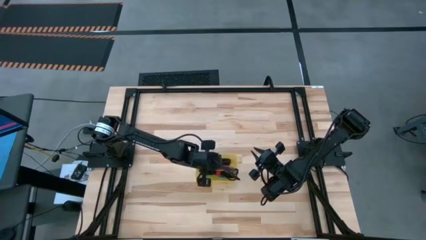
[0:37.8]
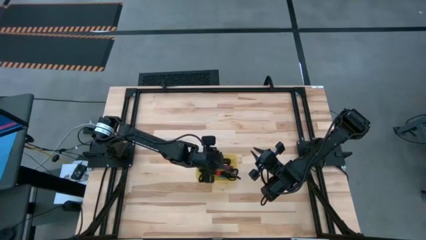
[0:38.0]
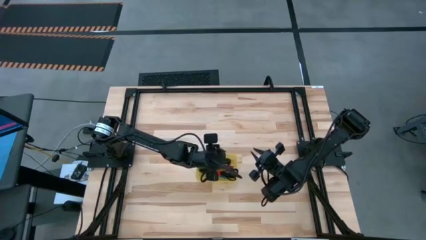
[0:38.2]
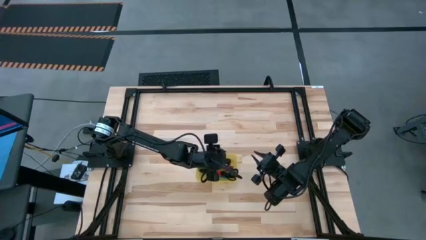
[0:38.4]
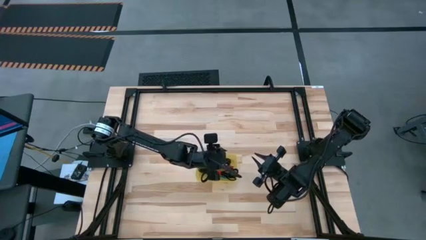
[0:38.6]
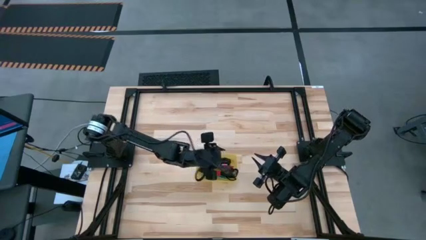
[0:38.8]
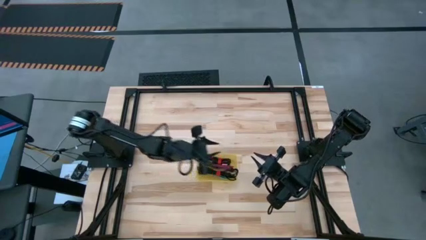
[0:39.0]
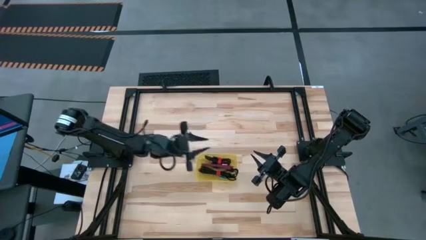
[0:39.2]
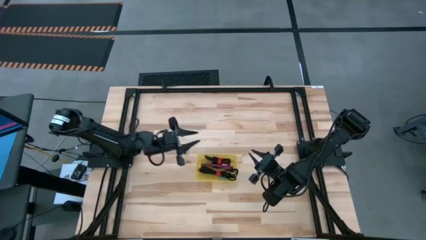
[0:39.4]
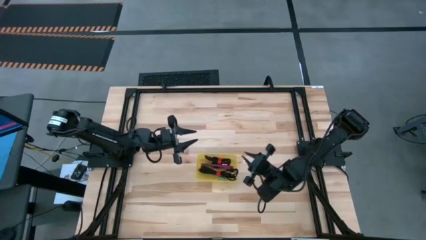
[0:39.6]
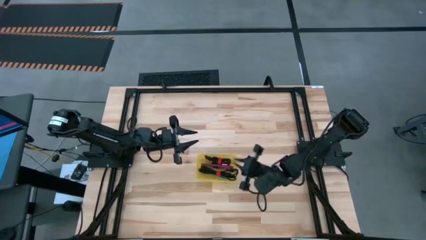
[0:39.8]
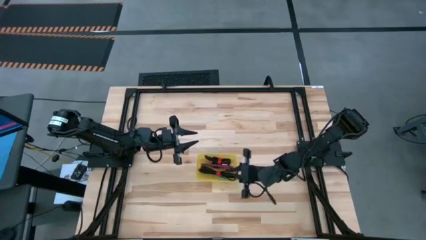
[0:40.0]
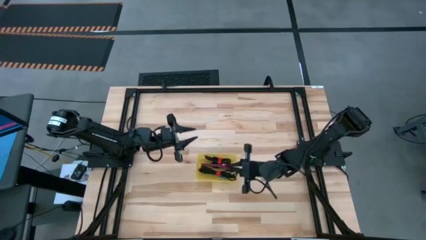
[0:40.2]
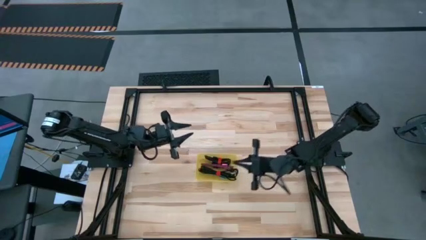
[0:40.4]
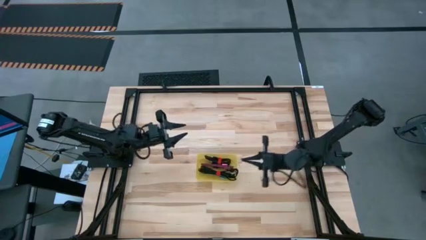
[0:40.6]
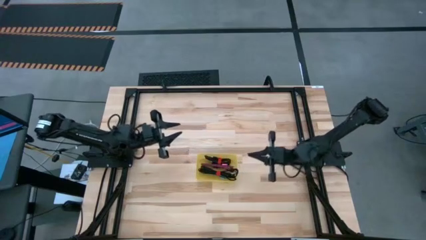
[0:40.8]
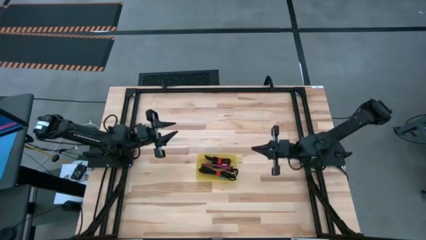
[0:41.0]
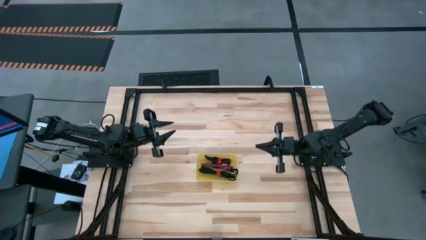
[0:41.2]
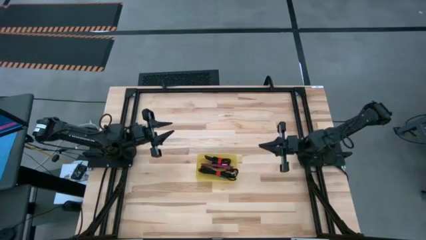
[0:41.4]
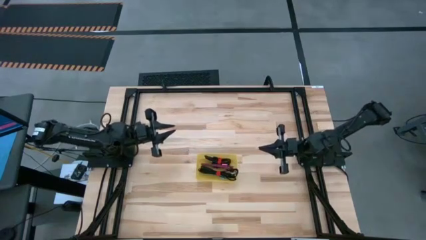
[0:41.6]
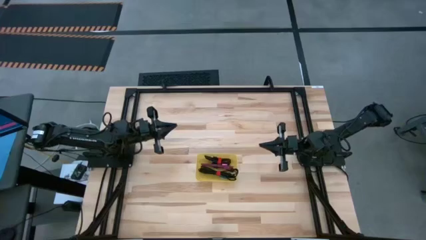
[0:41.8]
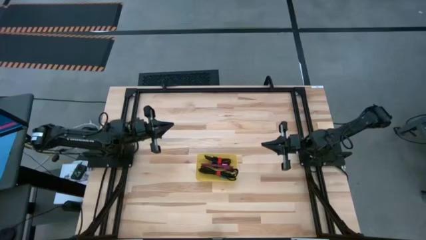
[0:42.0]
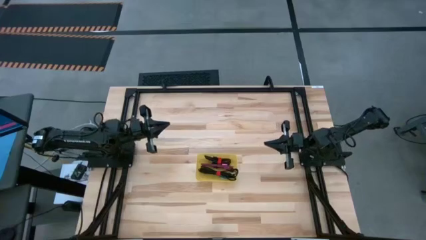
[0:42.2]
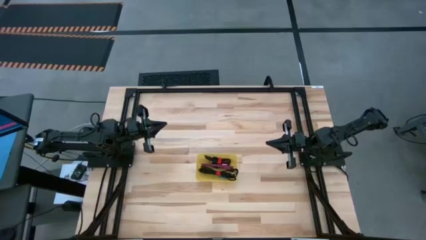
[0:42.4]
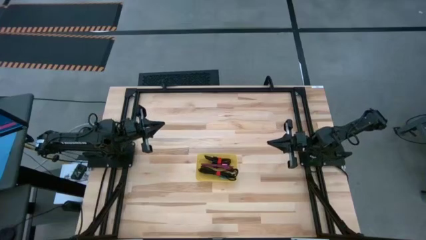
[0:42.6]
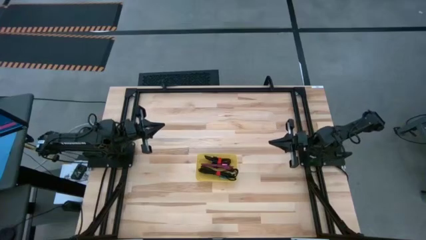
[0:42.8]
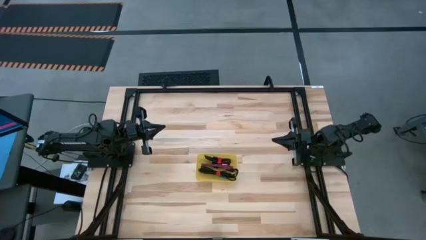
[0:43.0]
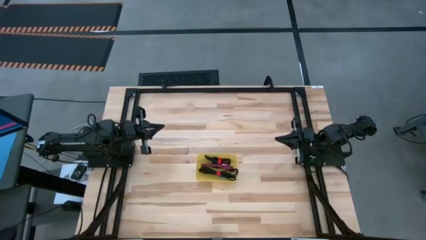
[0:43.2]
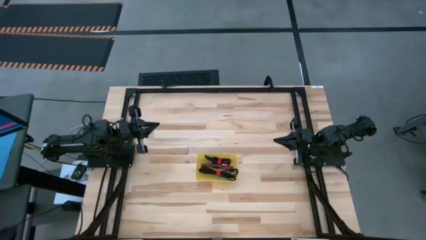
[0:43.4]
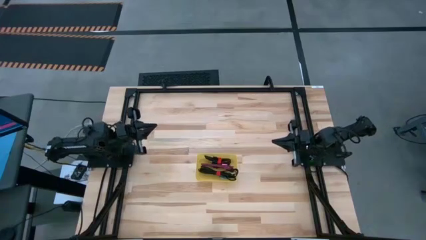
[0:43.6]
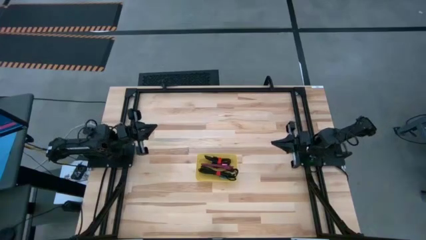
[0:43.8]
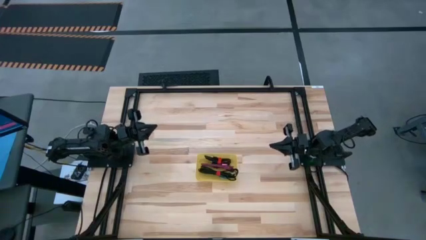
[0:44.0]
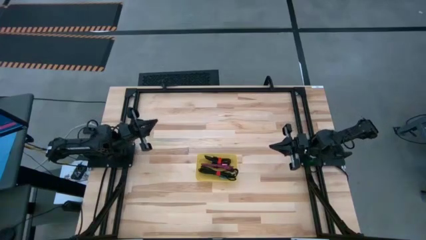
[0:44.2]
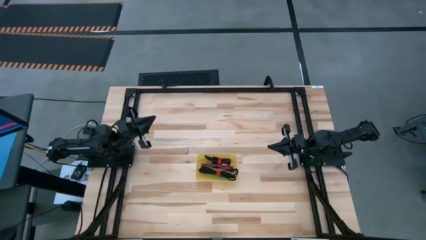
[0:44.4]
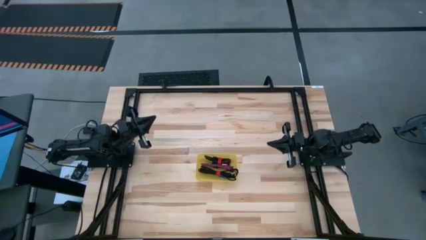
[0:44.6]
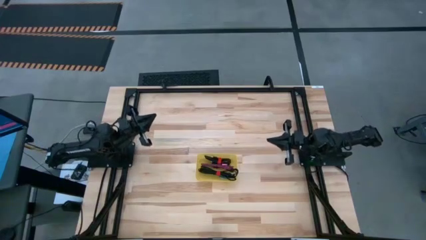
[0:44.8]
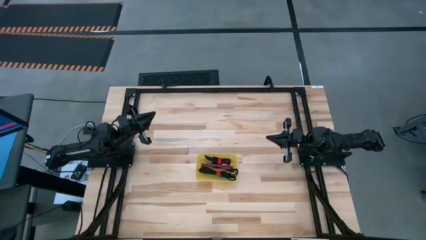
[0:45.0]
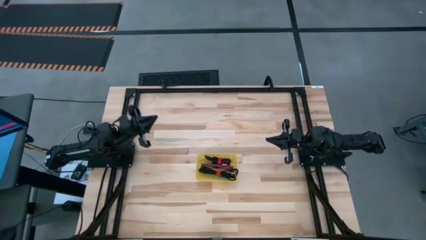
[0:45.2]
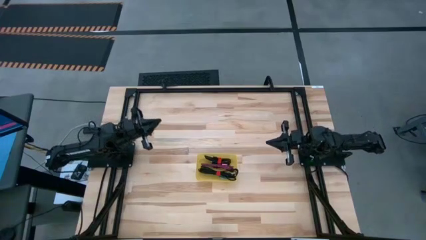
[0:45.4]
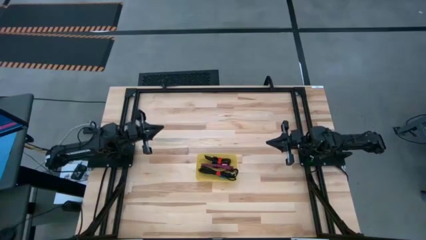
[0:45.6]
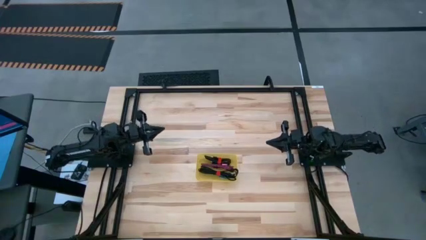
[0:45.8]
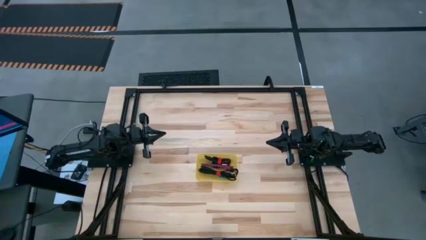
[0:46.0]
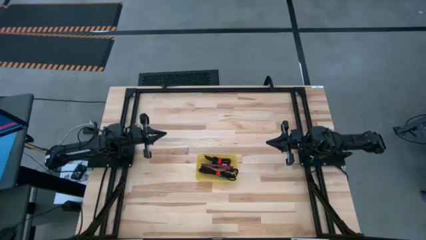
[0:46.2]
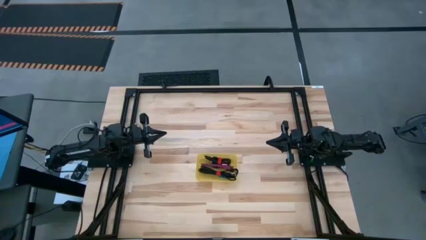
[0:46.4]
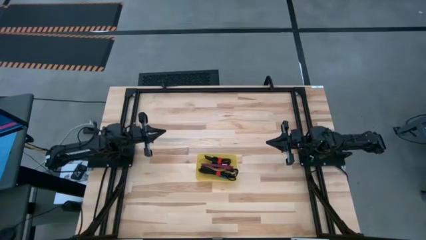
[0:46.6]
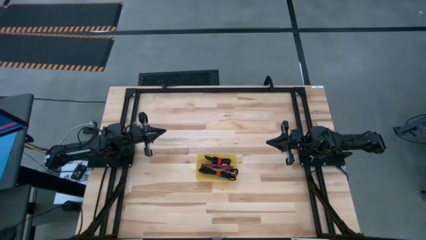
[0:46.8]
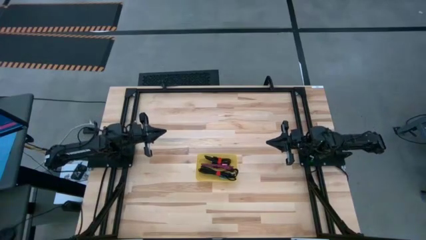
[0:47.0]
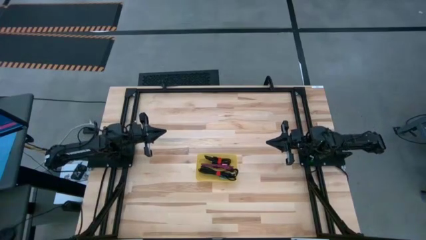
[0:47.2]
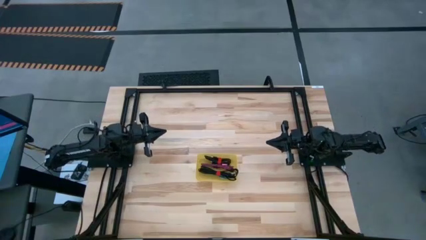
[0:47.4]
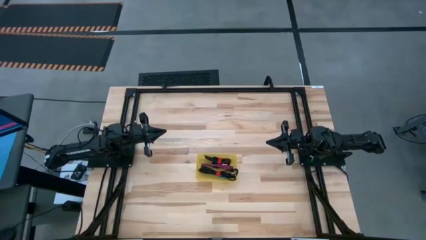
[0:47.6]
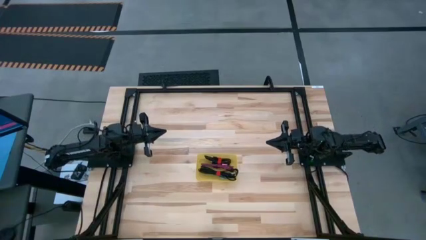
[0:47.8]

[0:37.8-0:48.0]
Task: Pick and place USB-C Cables
Return to Home Position

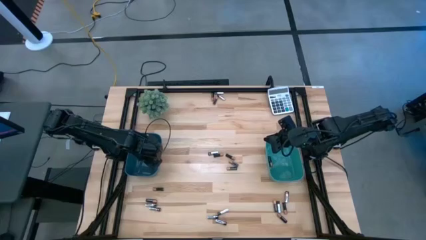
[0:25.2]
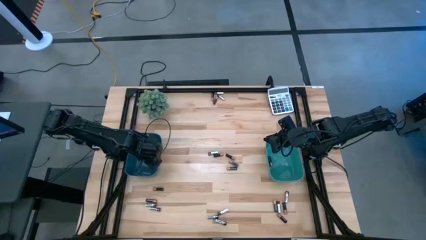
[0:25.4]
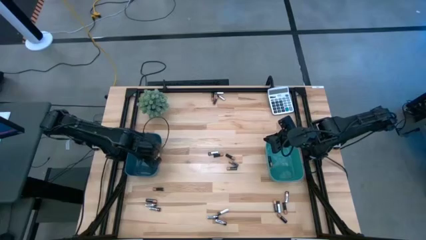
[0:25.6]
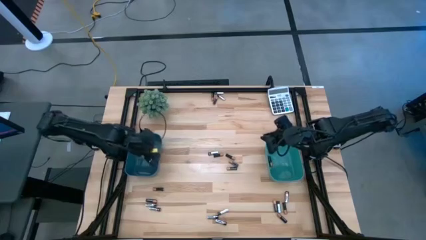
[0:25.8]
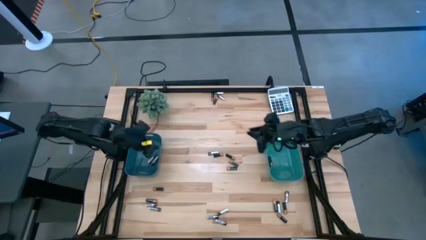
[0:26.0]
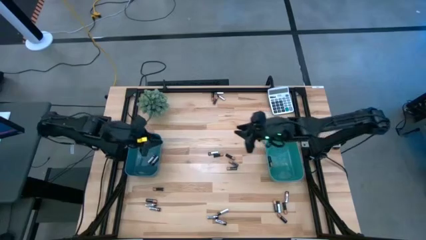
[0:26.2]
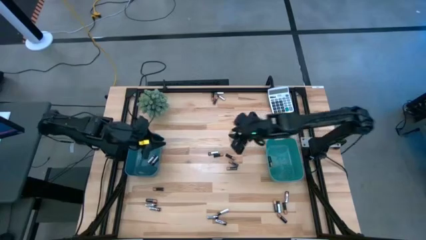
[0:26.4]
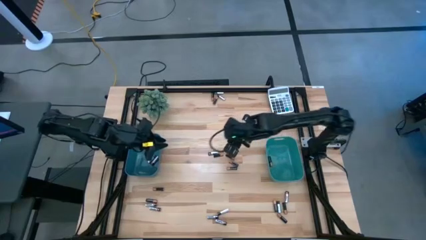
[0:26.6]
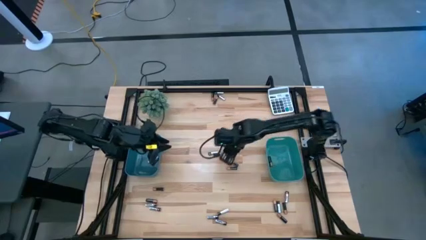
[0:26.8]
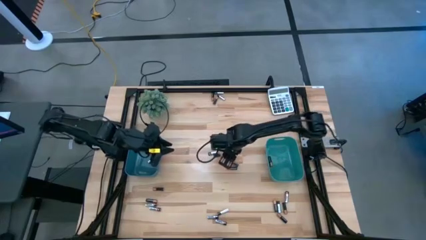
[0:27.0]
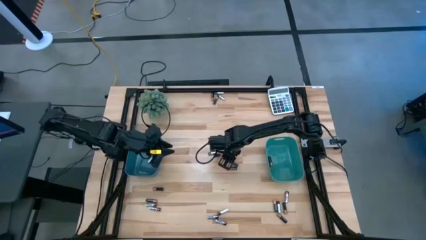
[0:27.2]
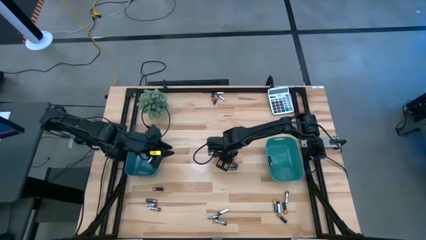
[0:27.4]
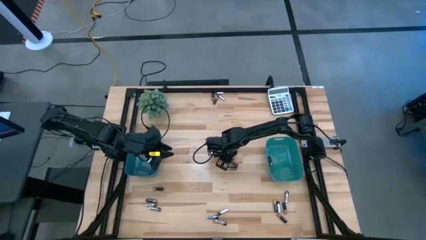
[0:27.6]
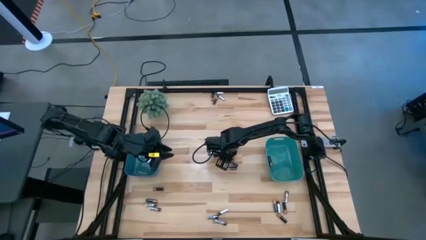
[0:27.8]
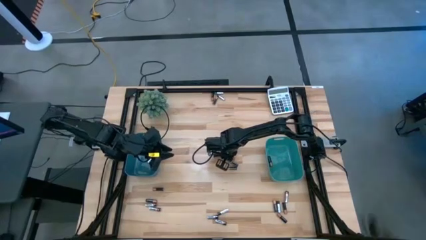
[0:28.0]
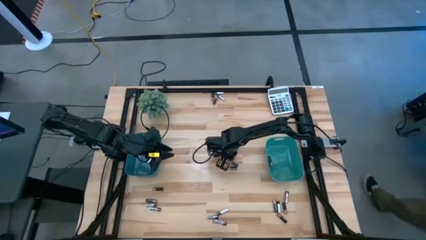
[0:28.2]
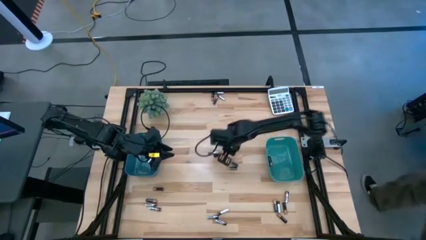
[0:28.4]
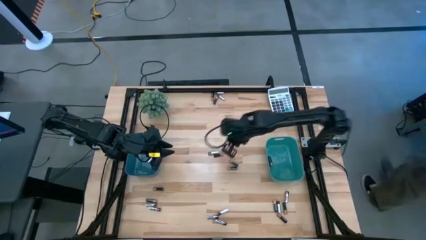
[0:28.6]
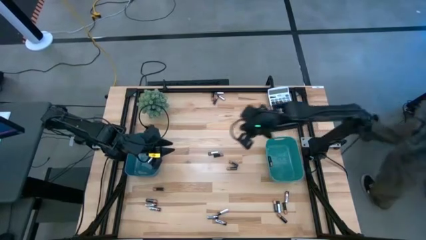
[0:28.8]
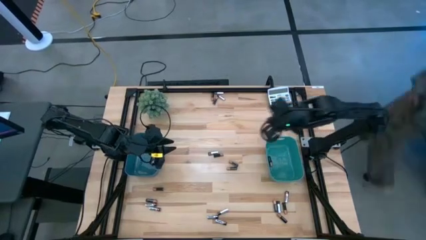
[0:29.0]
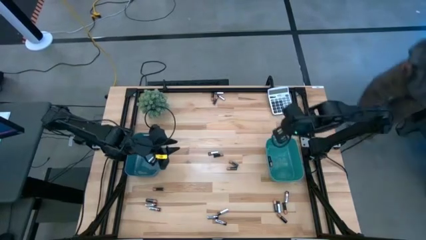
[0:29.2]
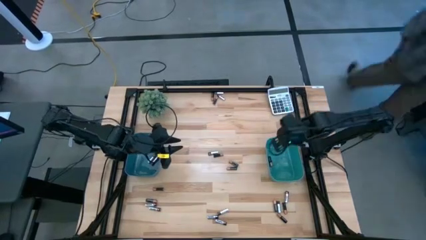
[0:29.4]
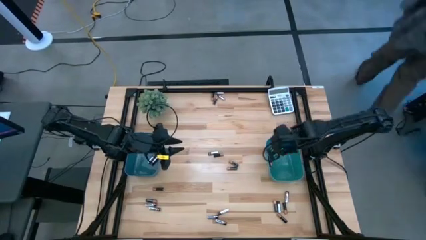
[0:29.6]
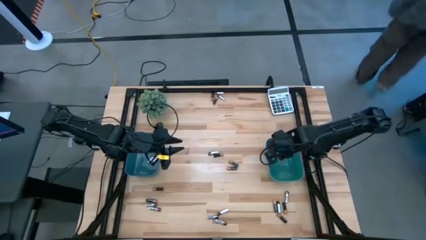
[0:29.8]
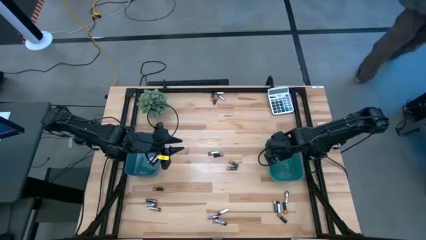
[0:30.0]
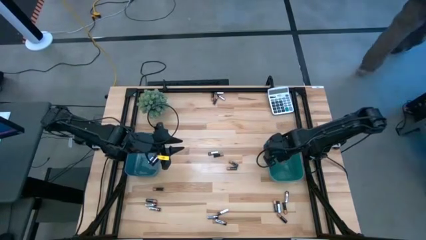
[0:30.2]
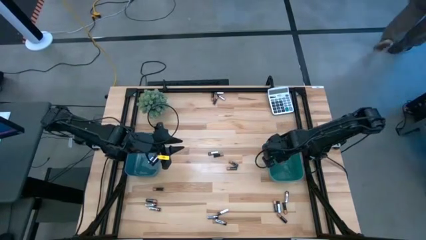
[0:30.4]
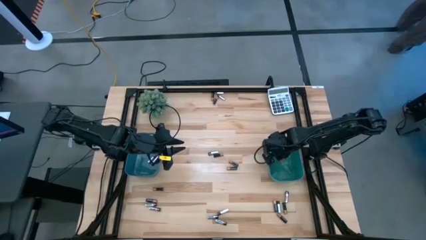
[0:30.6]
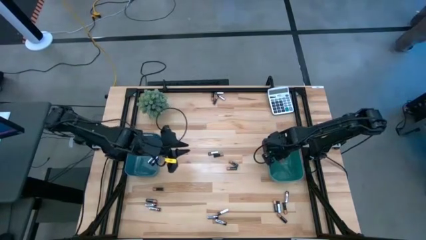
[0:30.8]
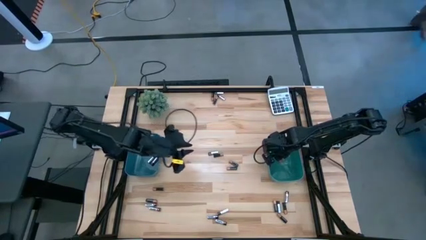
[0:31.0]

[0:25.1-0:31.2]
Task: Sort batteries
Put the black battery into the green bin
